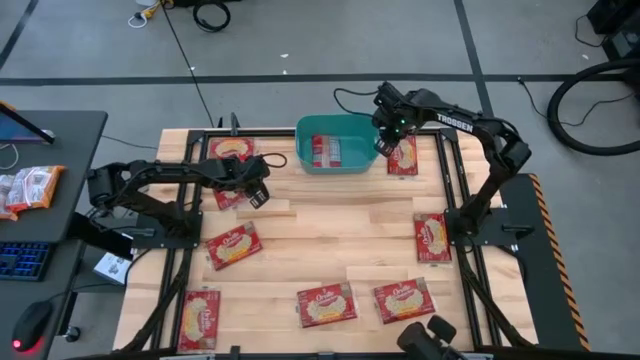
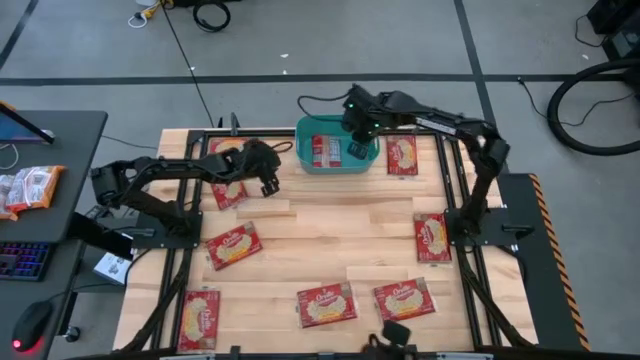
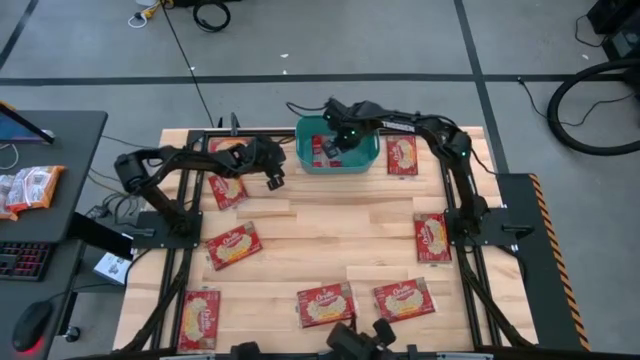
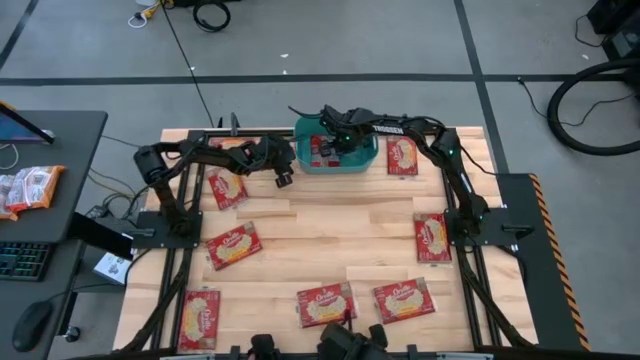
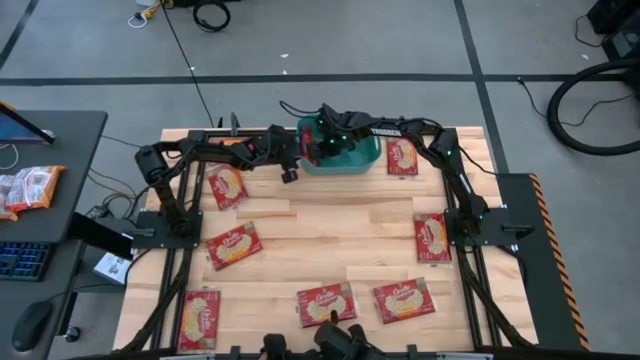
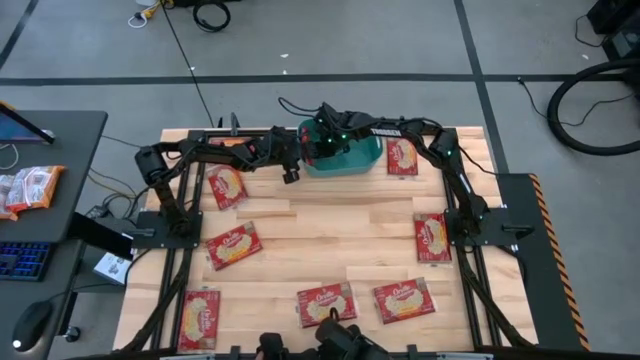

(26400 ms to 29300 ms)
Task: Sort popcorn bags into baskets
Adjust the popcorn bag in the bin

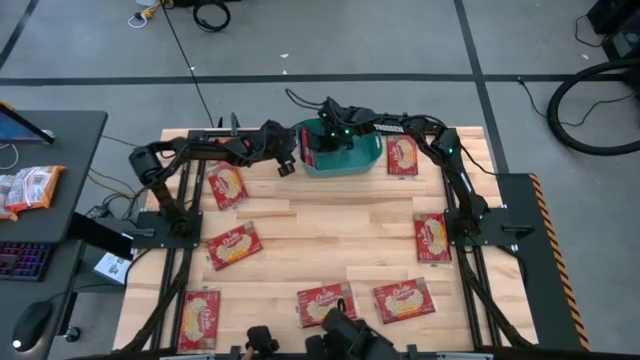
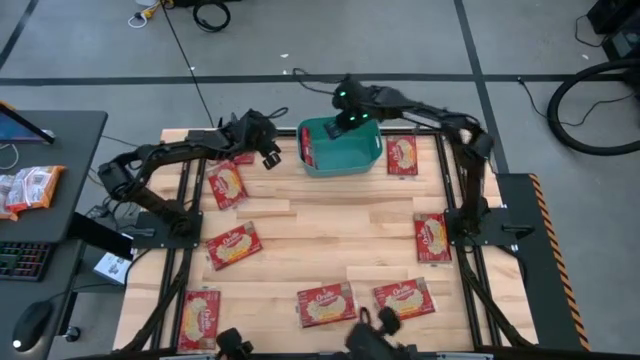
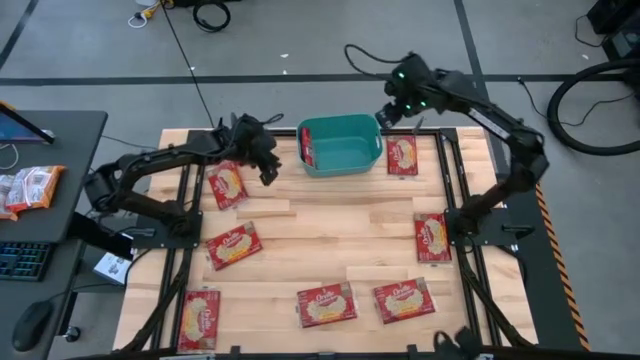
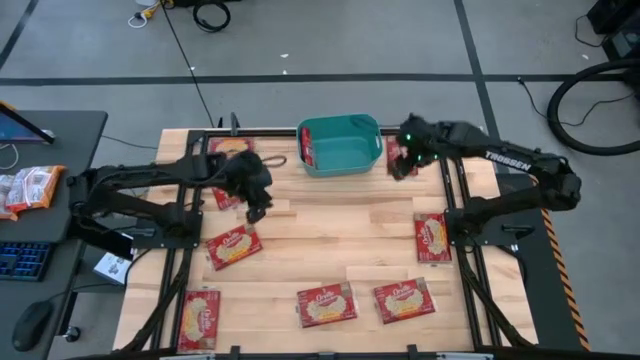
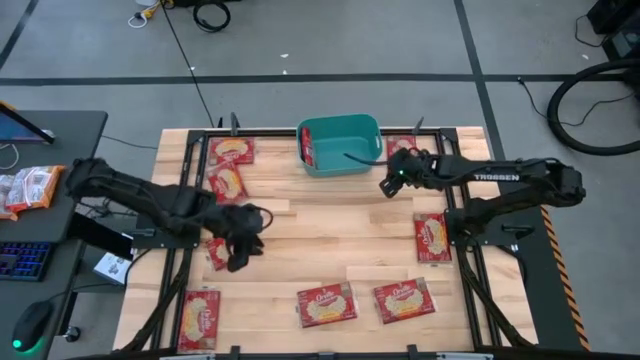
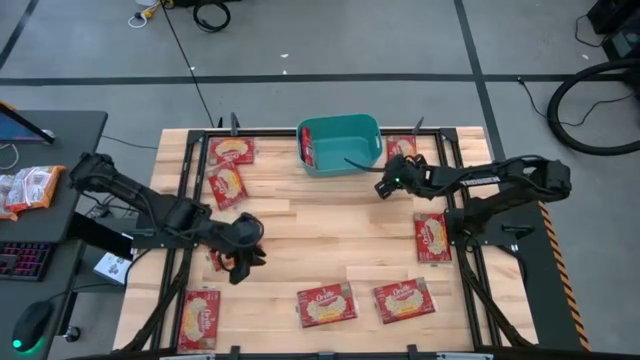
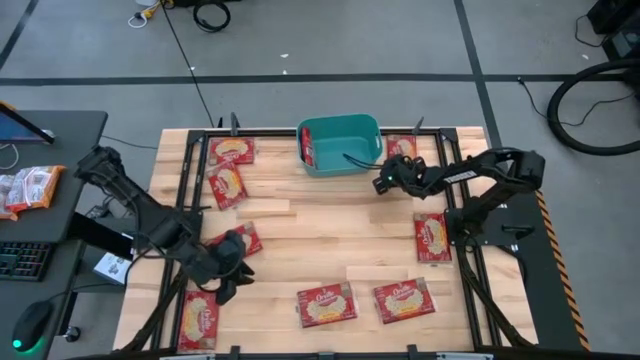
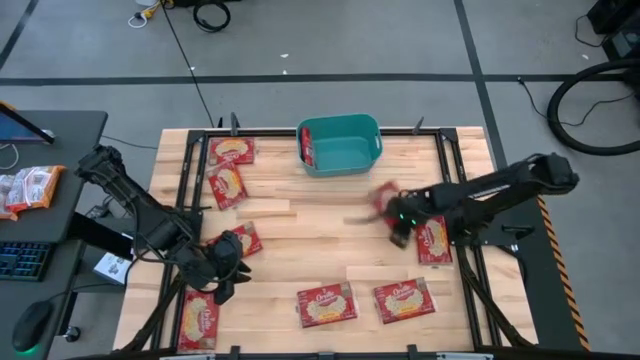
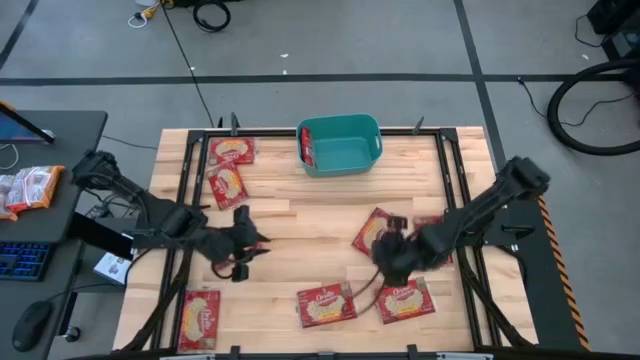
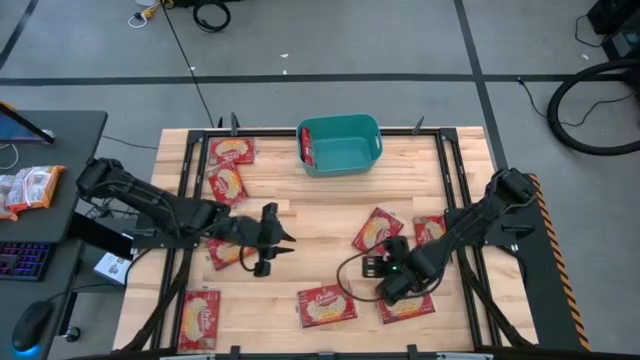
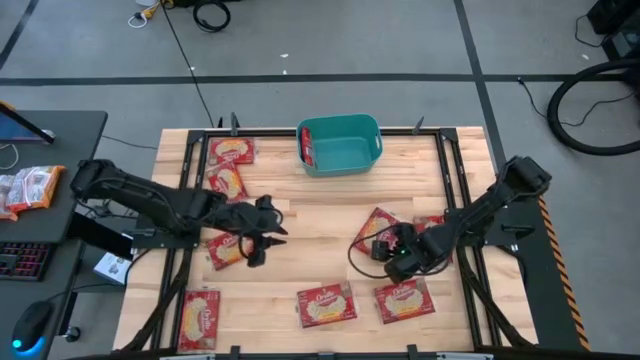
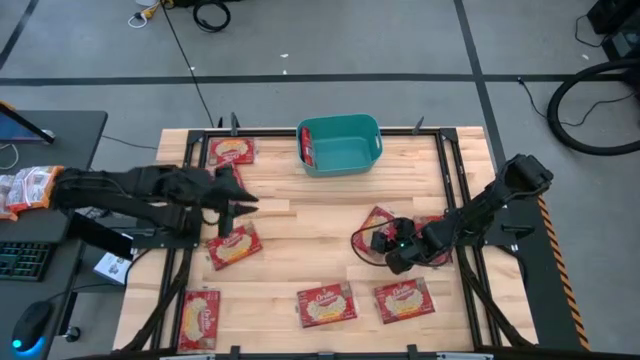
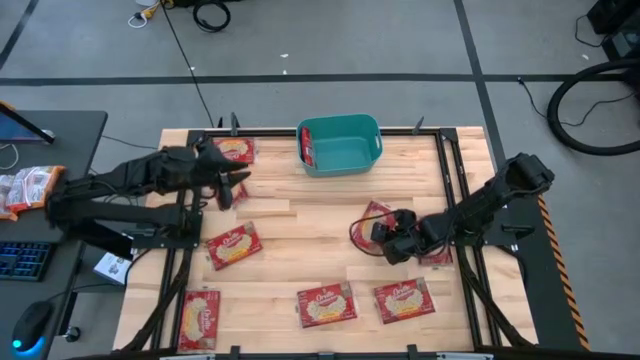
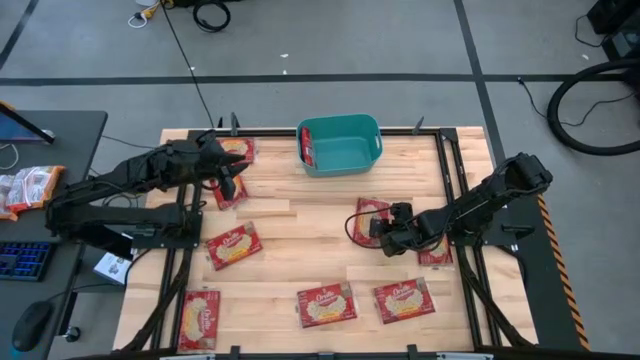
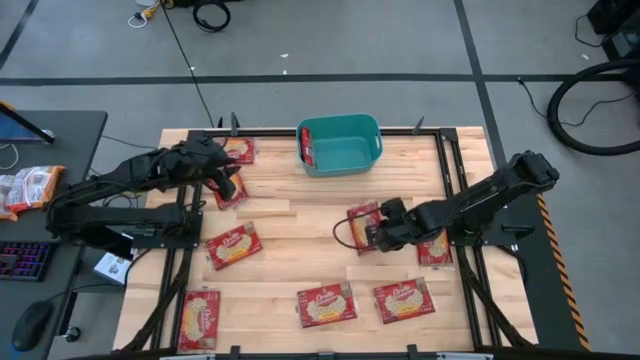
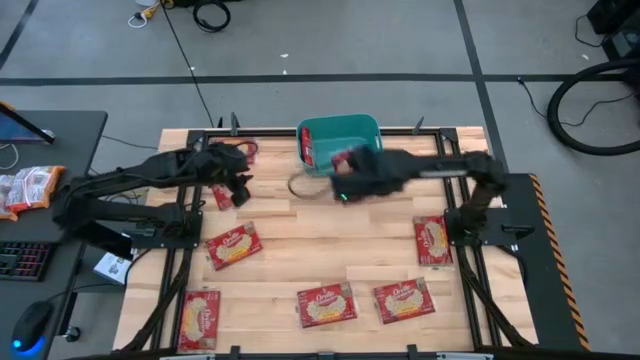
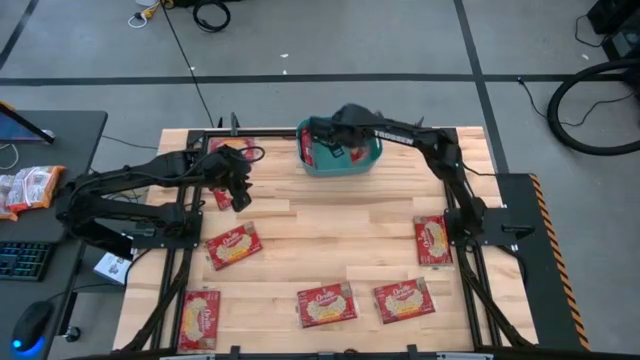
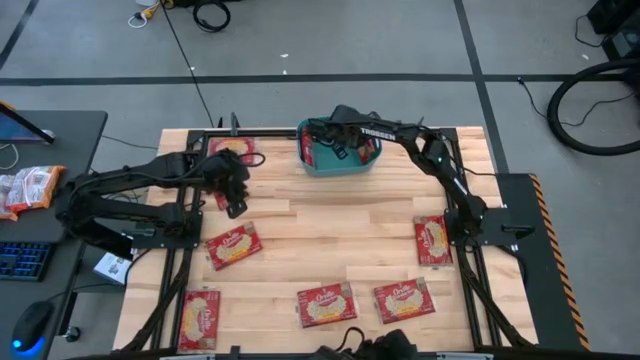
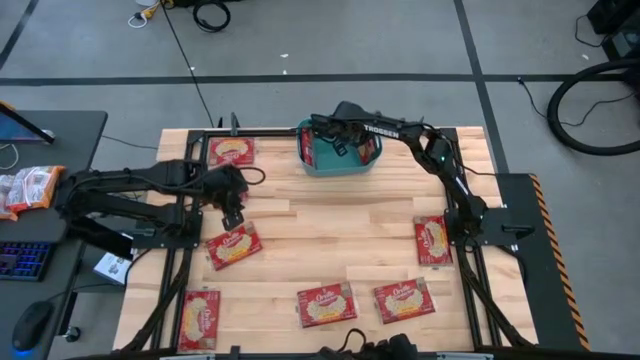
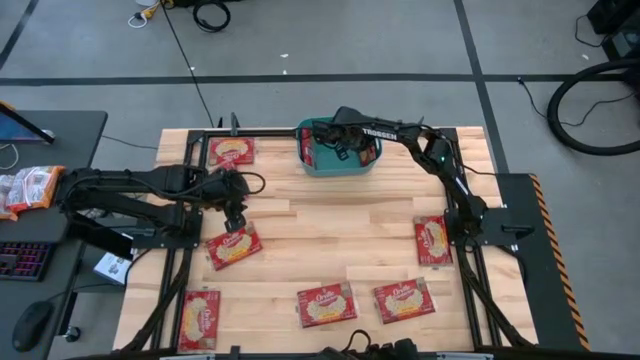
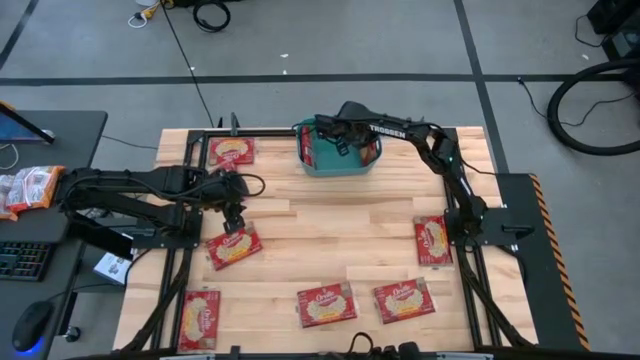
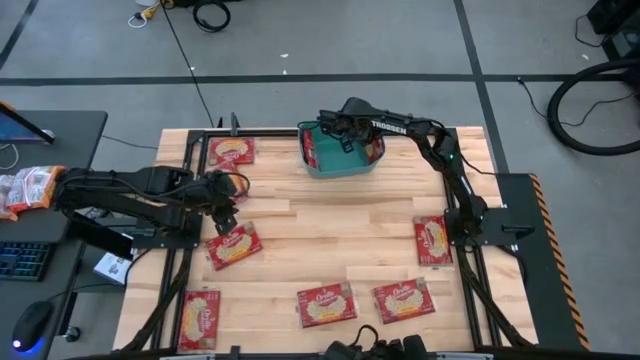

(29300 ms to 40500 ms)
Put the popcorn bag into the bin

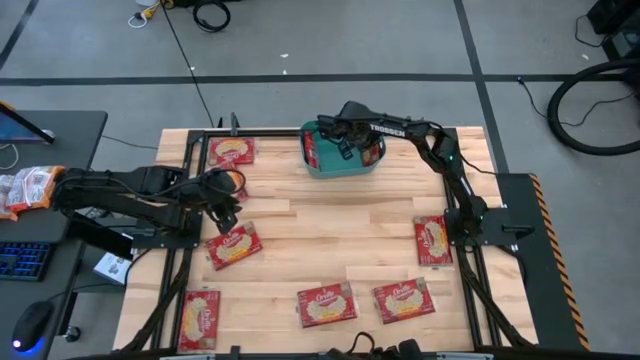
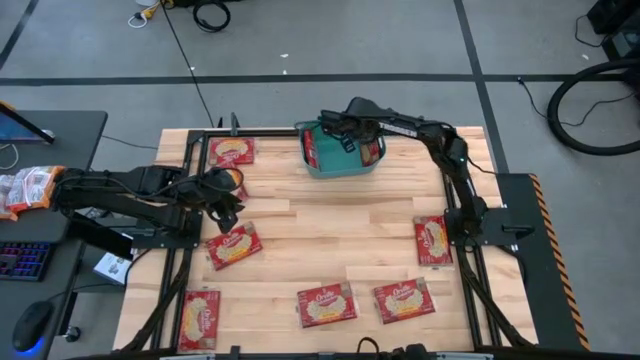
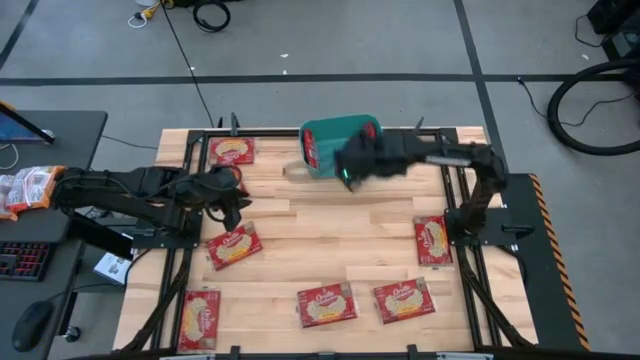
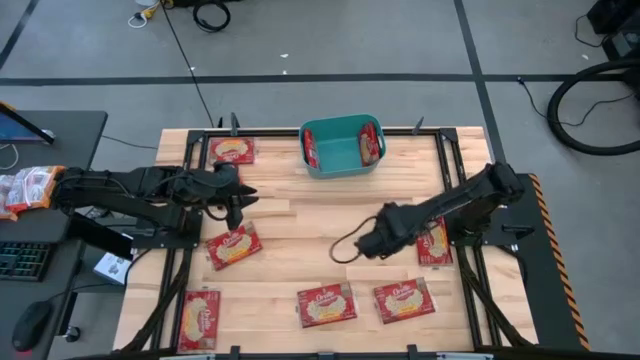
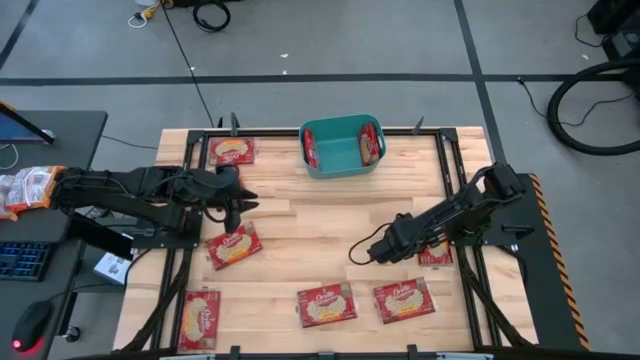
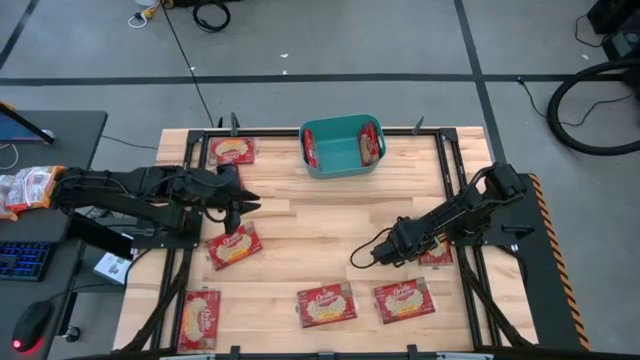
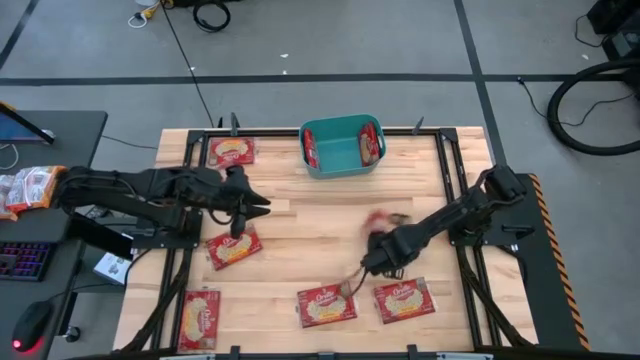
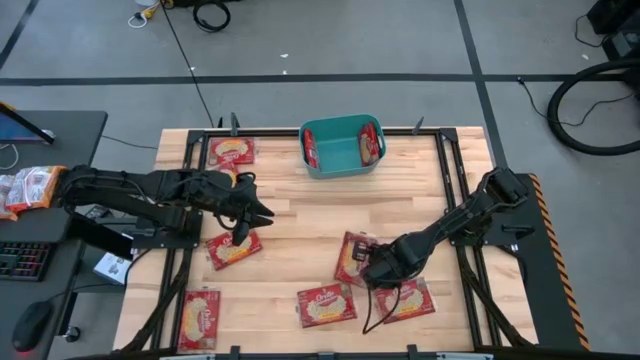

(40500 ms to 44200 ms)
Put the popcorn bag into the bin
